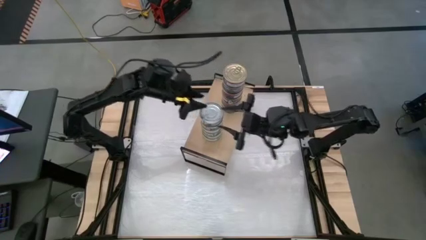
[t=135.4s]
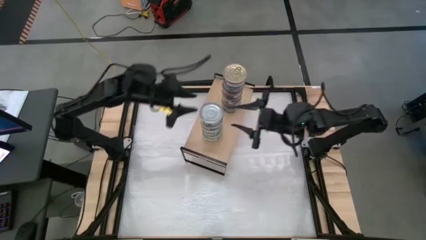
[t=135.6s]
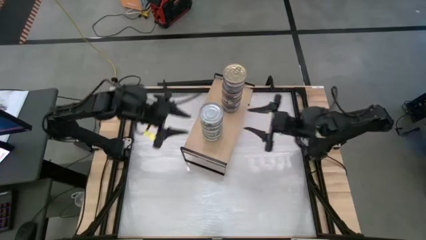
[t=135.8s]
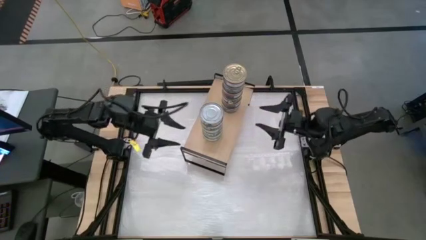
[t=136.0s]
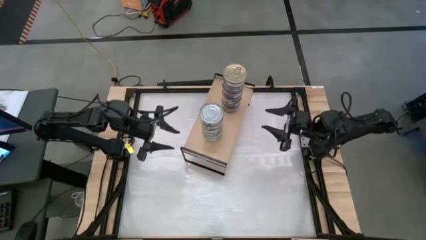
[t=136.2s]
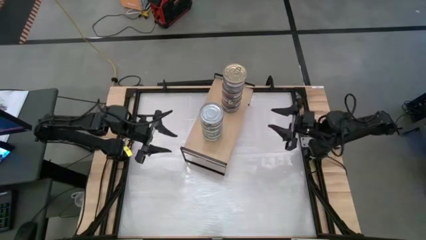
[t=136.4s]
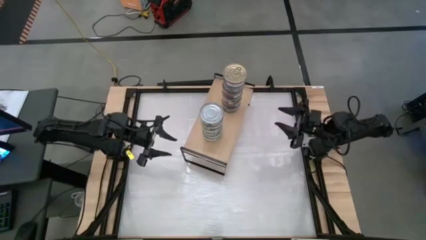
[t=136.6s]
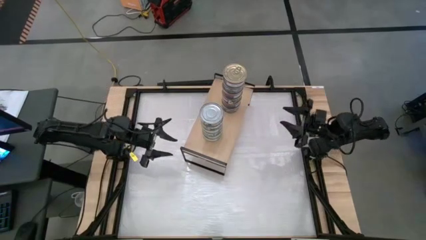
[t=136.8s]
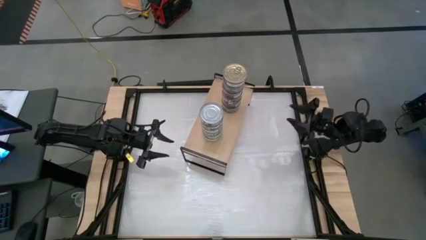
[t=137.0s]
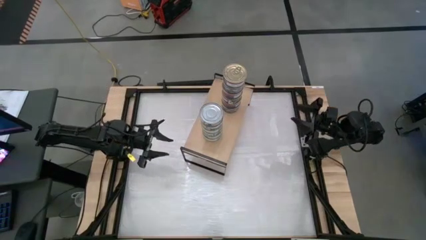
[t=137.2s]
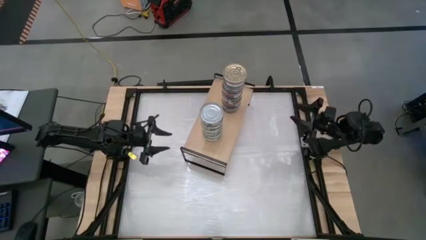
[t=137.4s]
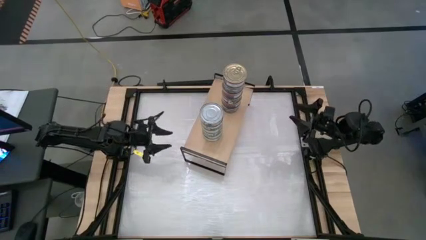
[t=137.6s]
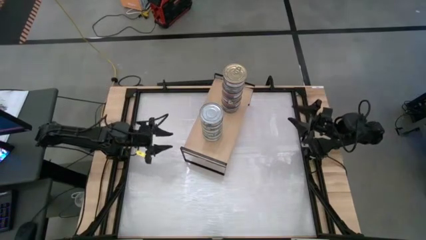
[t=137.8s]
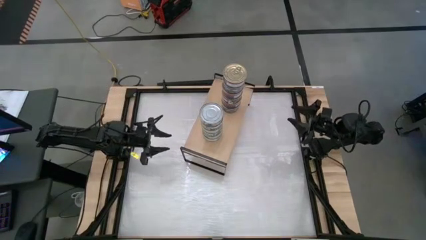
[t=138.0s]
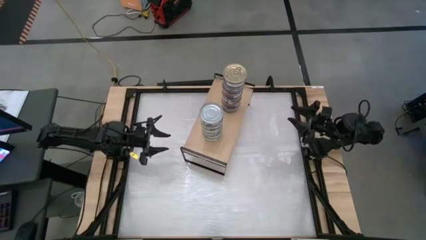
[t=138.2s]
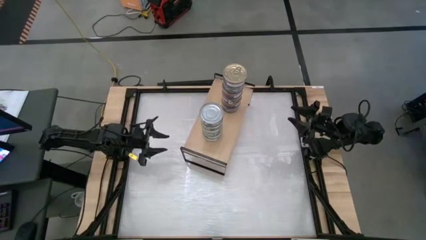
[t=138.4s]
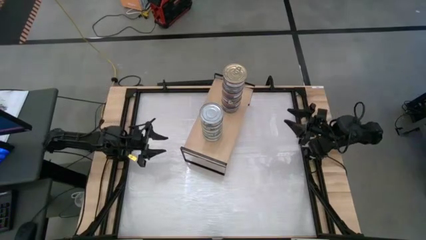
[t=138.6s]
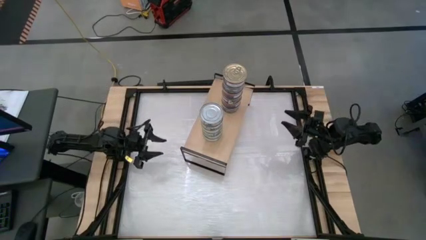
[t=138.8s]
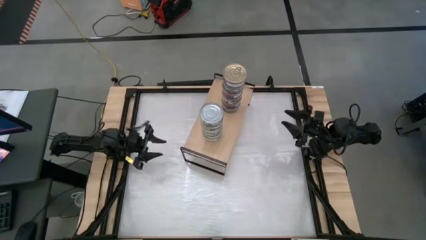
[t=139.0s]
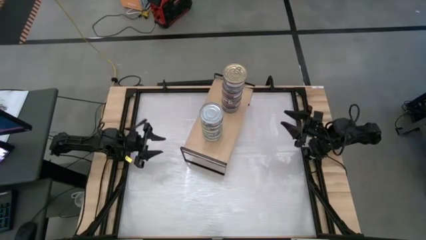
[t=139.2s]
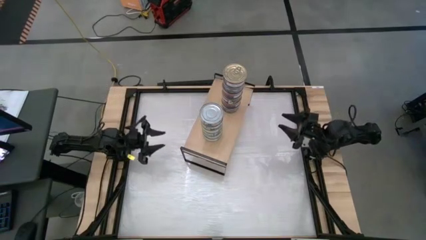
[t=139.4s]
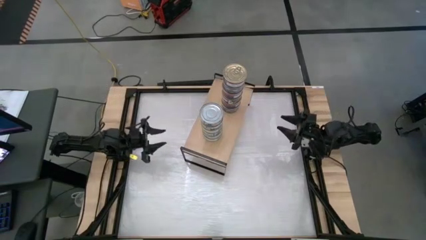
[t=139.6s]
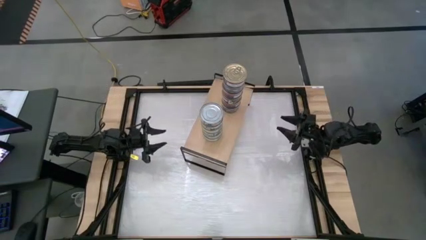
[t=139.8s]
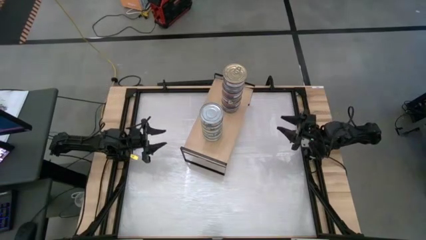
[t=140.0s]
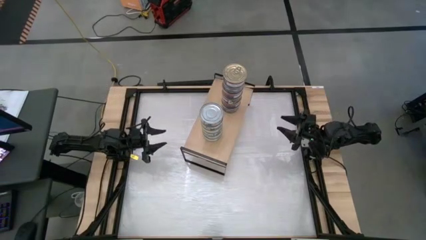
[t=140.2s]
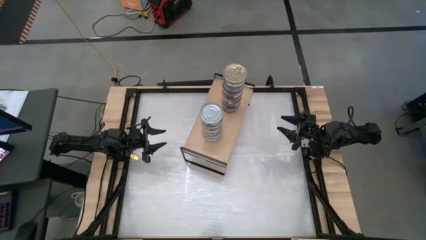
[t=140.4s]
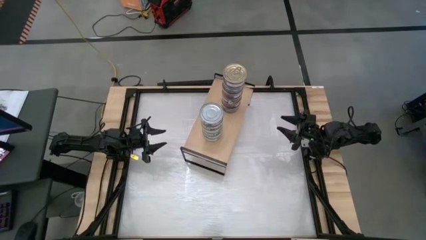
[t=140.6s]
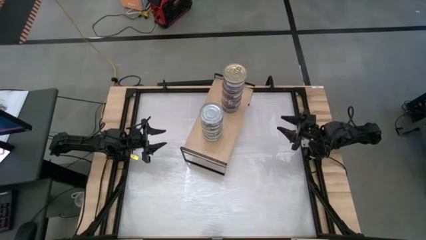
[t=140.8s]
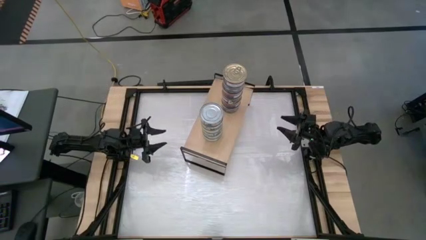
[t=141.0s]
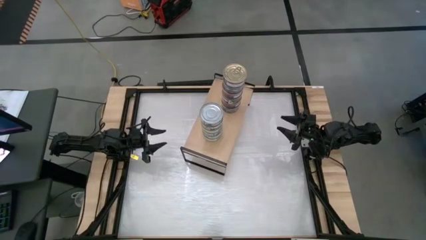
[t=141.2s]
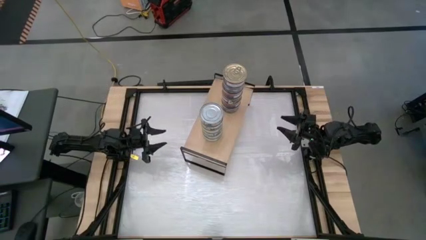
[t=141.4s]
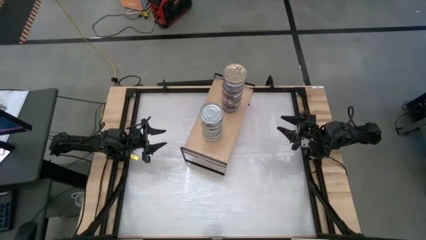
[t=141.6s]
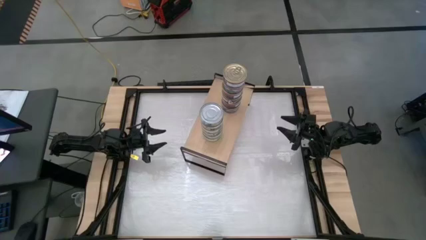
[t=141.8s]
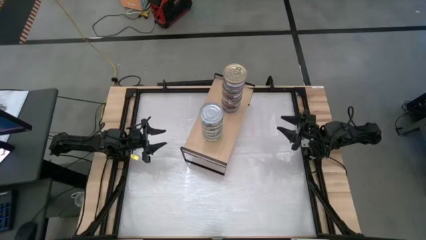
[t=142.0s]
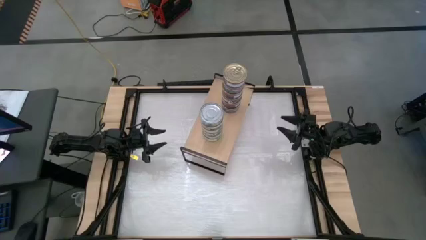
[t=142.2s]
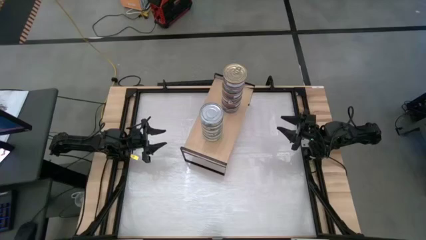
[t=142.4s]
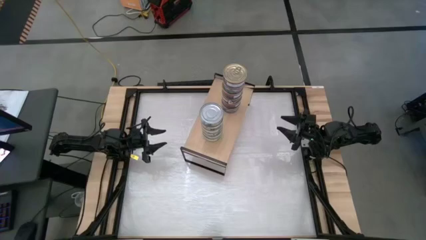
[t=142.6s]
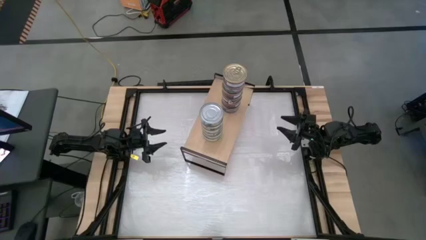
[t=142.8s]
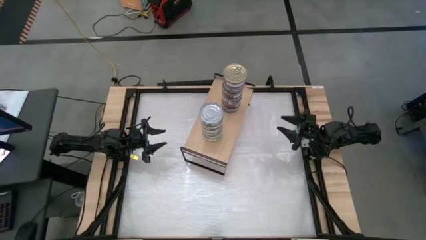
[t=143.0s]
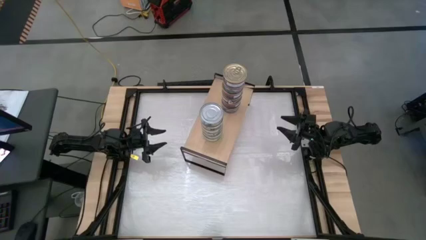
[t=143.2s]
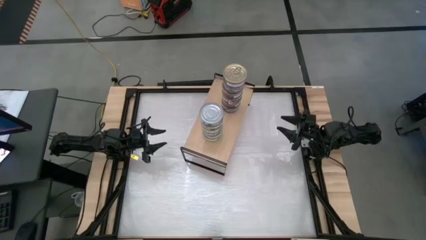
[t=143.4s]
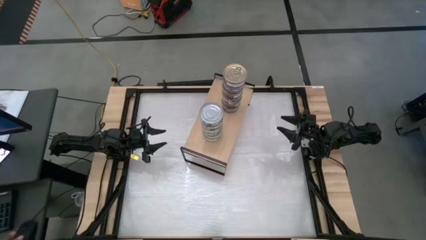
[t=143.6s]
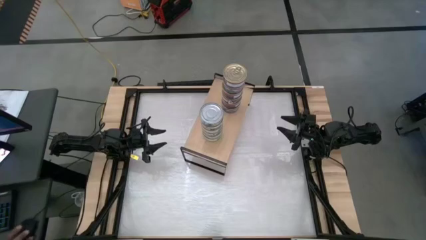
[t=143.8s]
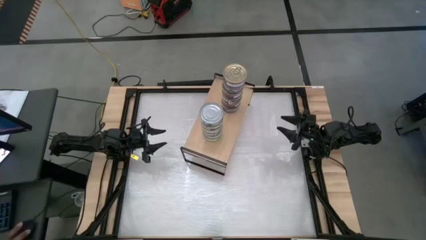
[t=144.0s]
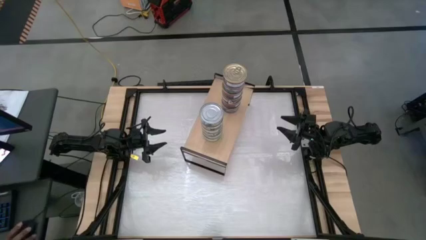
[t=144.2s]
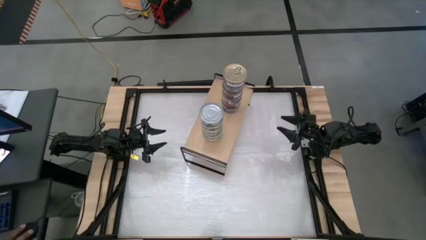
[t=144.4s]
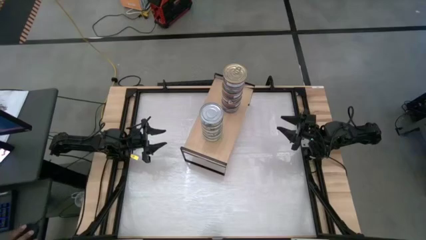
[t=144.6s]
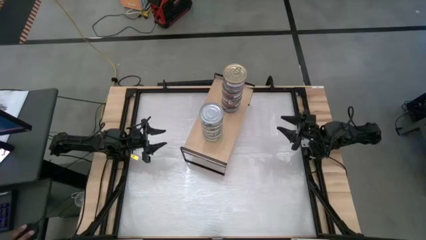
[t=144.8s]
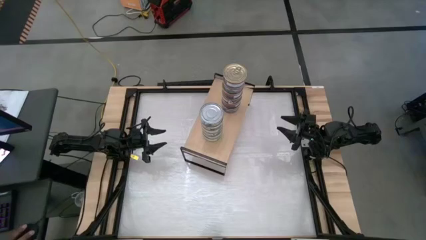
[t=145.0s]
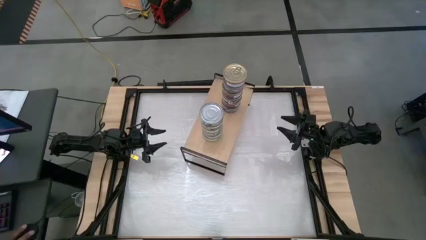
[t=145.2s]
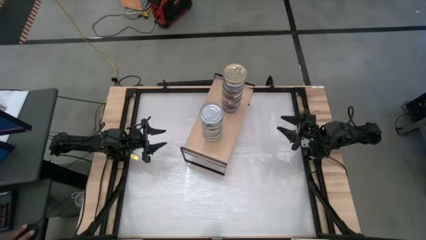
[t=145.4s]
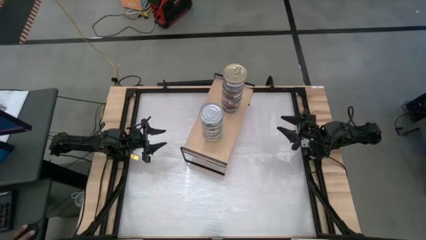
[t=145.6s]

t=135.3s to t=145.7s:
Task: Stack canned seafood by type on shelf
Return to Home Position

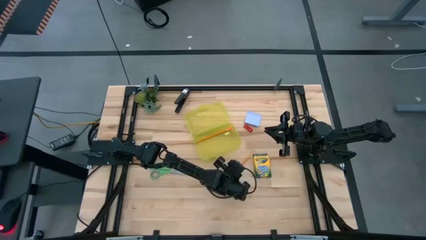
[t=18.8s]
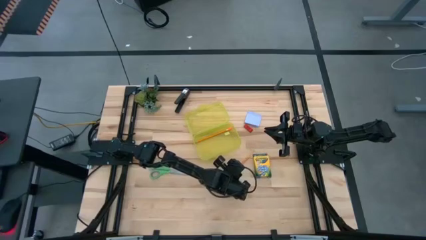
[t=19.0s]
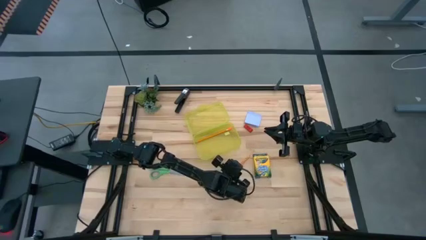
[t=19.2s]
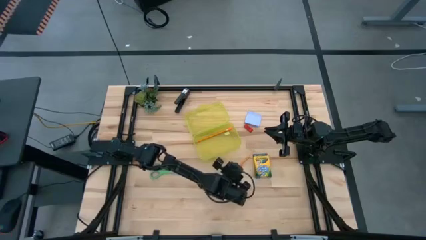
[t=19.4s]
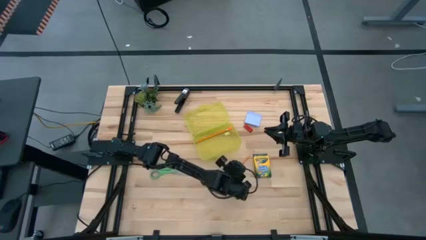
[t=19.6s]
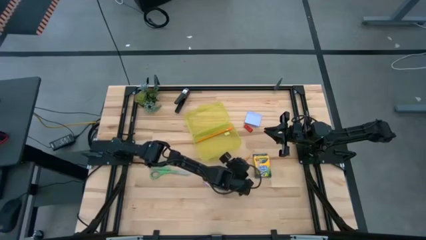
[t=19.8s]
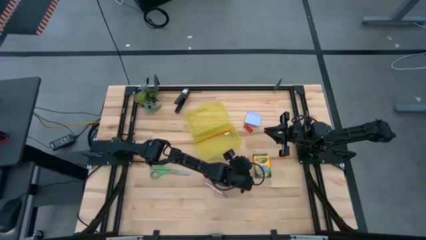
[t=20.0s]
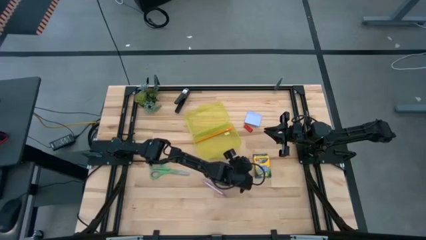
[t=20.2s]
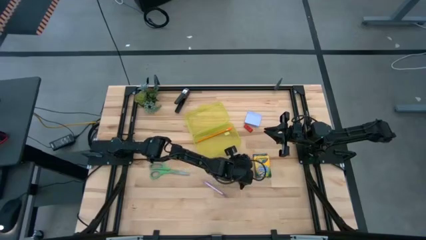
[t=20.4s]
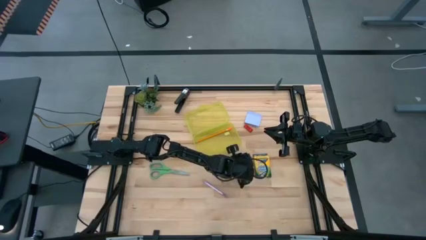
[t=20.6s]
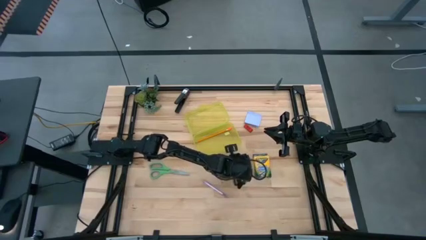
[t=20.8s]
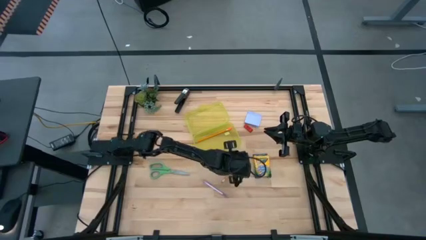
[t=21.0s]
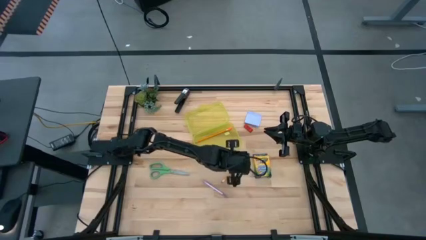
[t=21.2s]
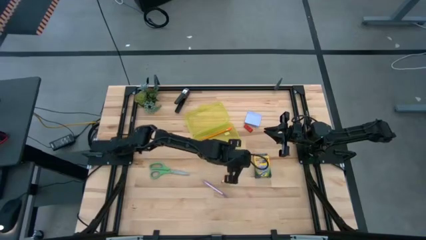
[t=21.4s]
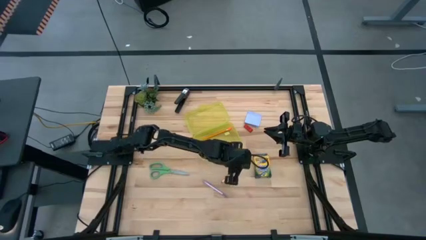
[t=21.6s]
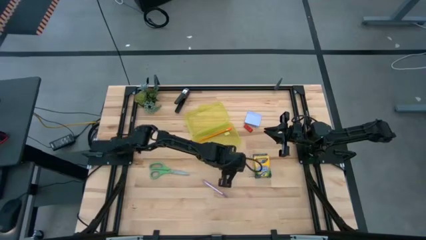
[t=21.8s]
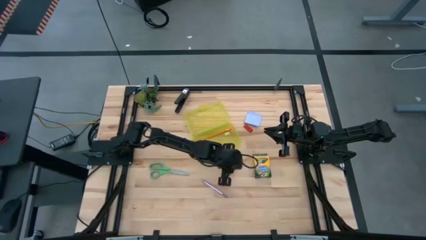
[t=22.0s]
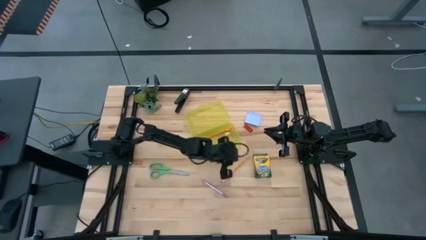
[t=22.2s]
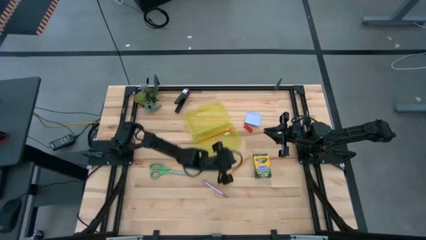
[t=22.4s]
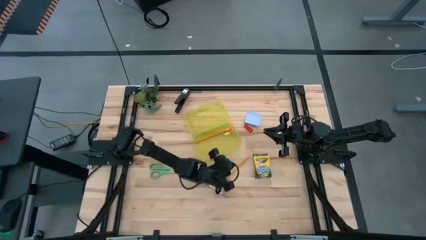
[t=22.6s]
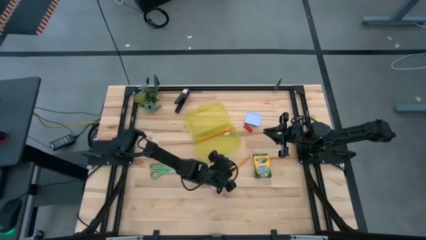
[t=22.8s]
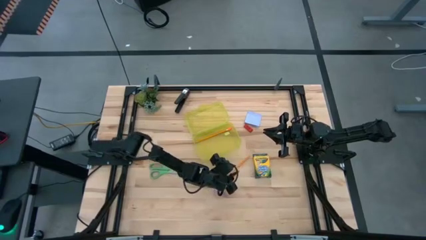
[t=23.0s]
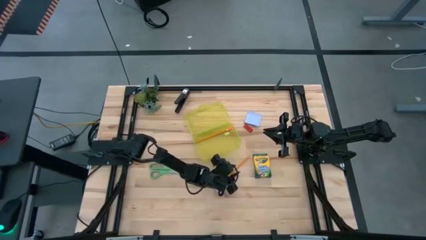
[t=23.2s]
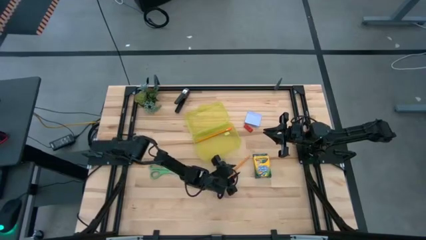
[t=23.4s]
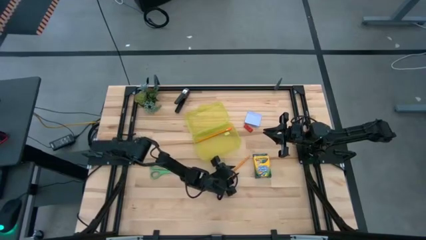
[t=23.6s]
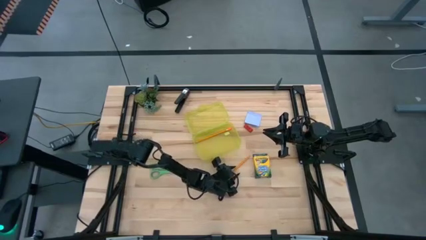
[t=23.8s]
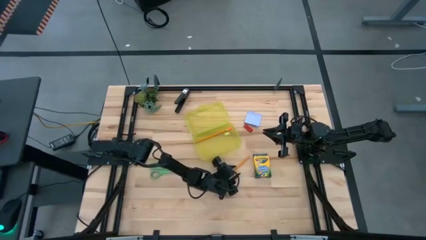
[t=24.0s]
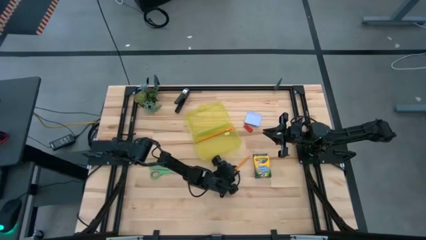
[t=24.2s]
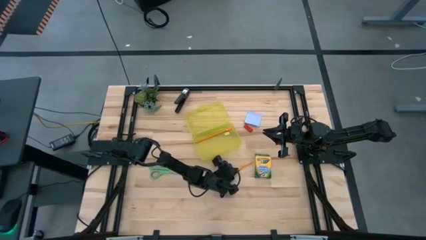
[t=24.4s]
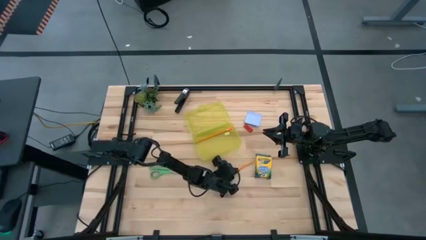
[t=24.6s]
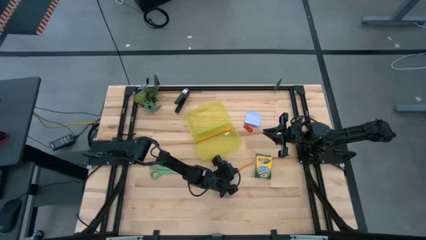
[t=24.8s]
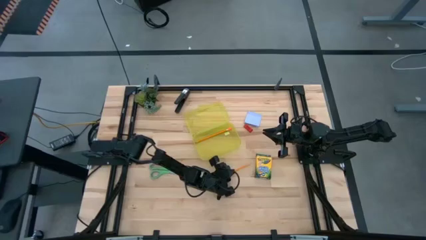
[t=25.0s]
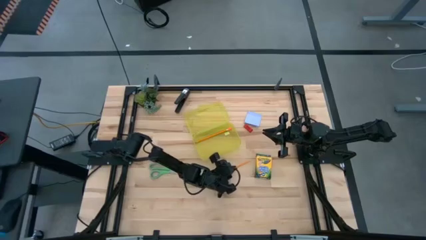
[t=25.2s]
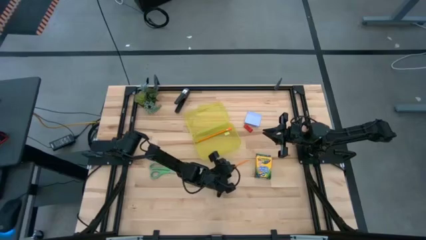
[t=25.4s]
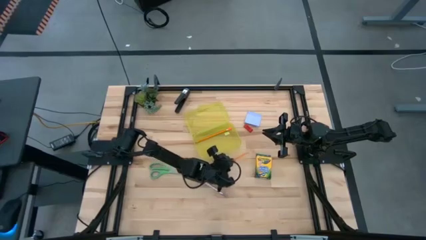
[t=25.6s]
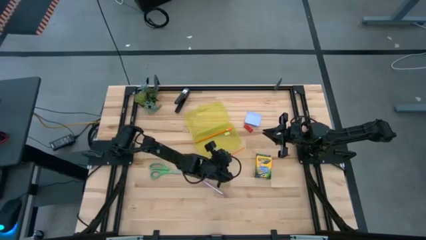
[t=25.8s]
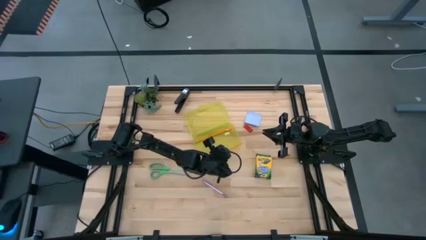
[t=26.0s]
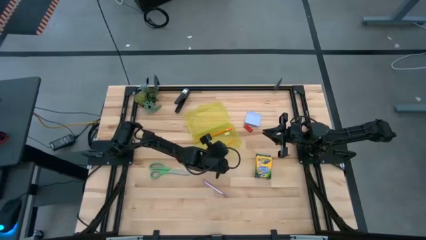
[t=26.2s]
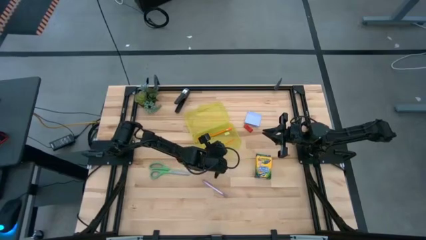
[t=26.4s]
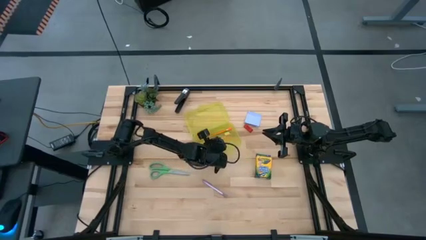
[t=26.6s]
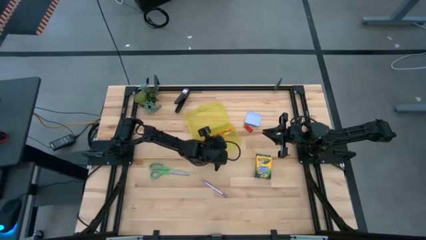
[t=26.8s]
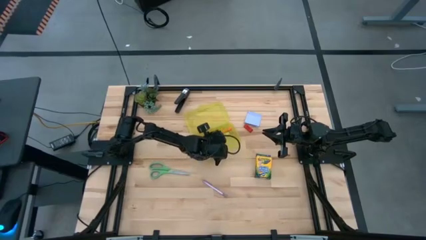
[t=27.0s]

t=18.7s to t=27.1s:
Task: Pack school essentials
Put the yellow pencil into the yellow supply box
